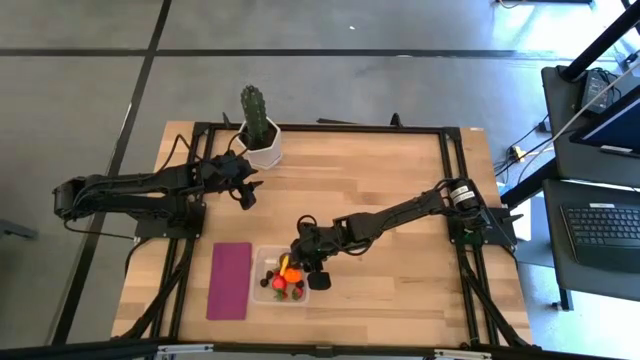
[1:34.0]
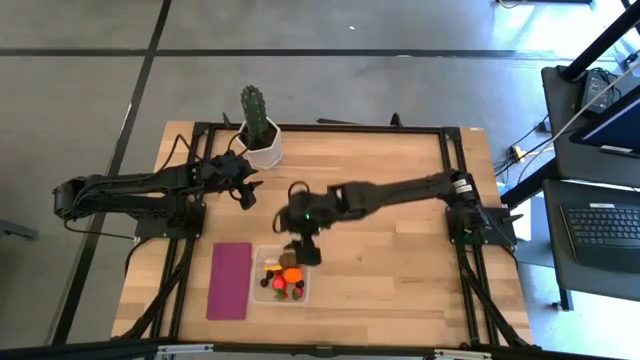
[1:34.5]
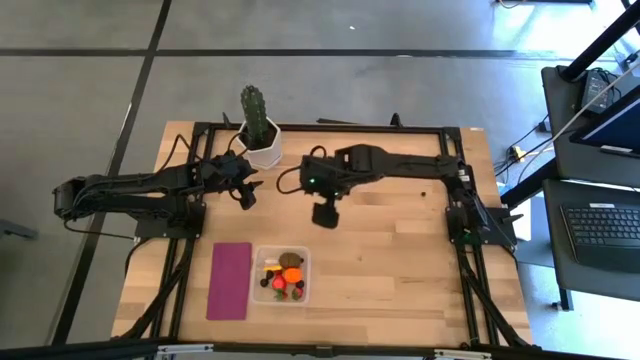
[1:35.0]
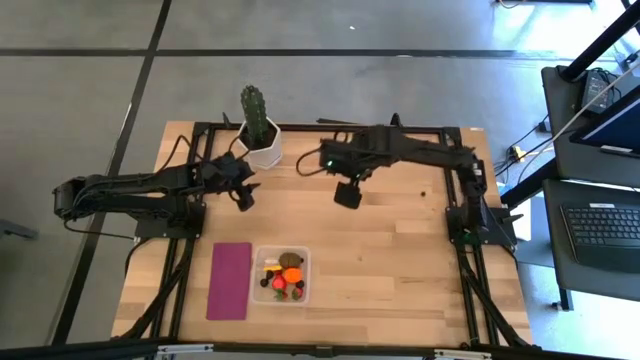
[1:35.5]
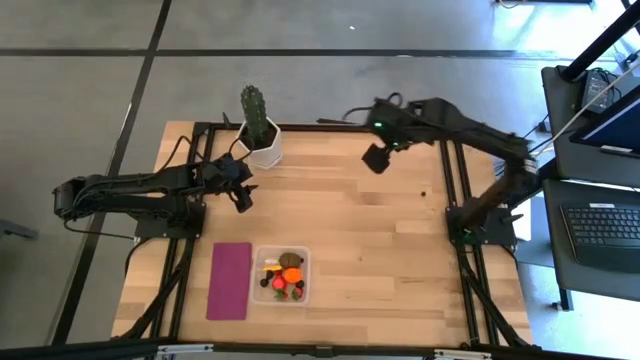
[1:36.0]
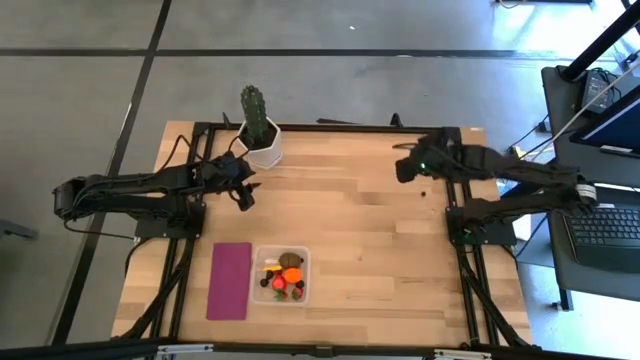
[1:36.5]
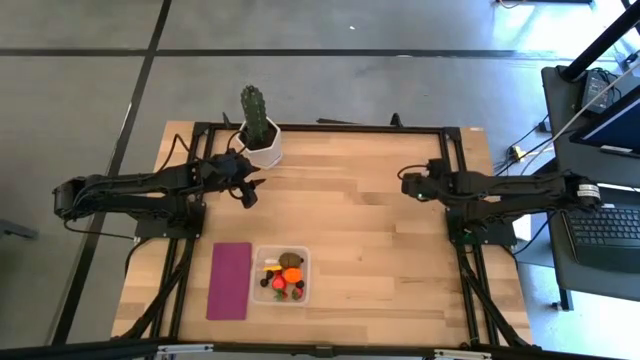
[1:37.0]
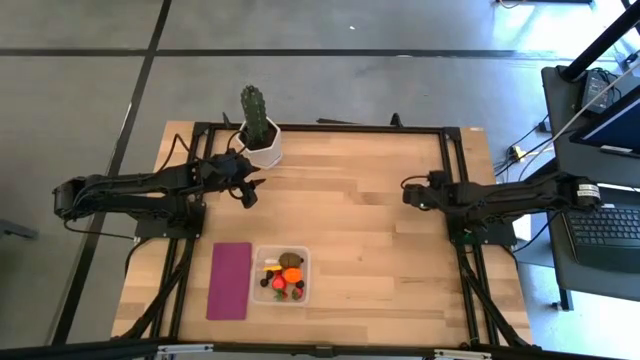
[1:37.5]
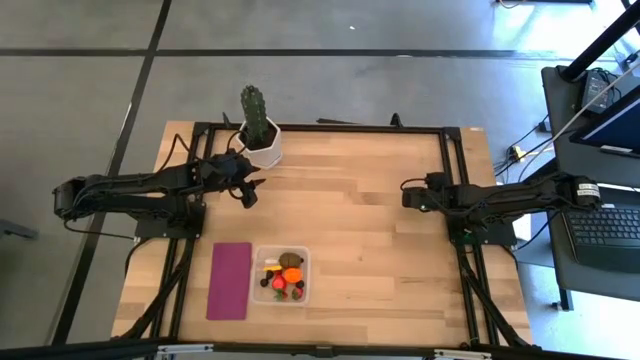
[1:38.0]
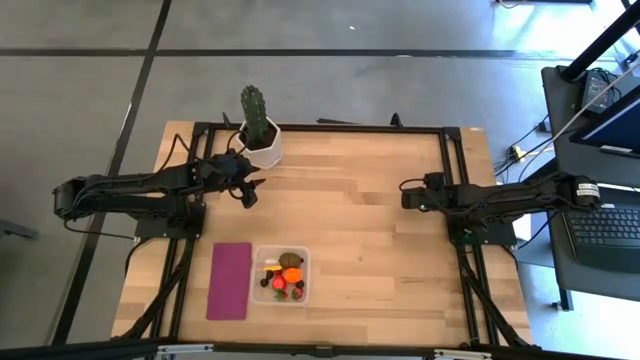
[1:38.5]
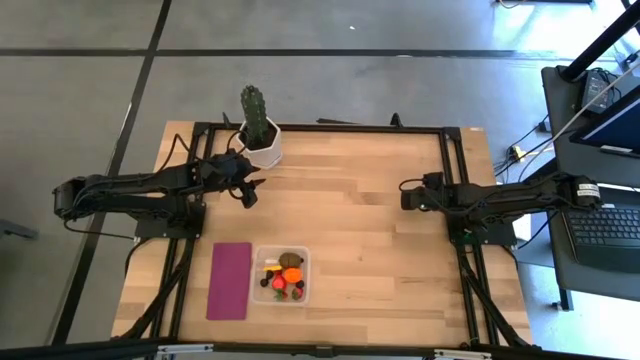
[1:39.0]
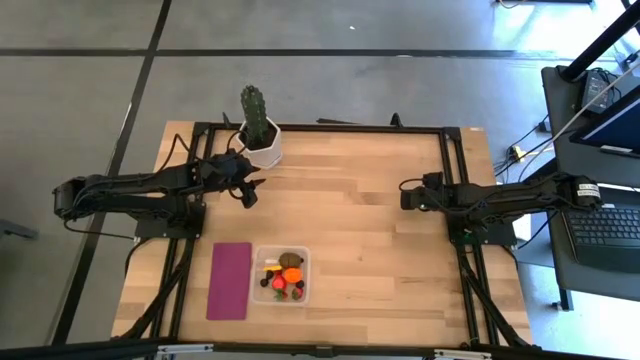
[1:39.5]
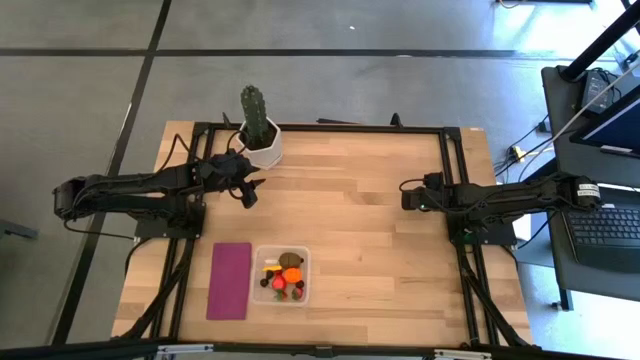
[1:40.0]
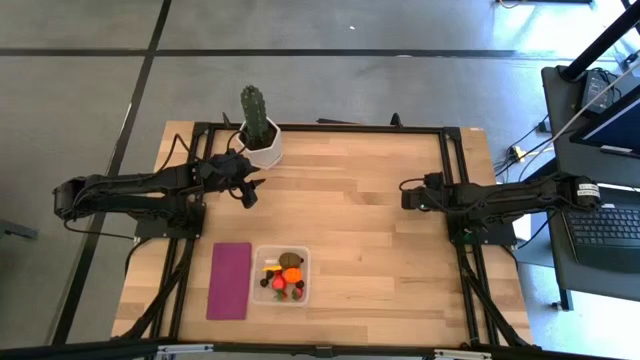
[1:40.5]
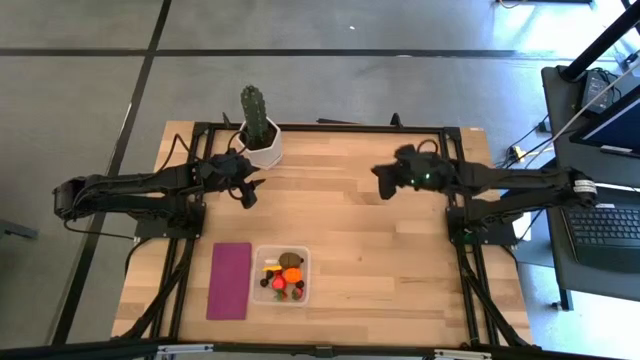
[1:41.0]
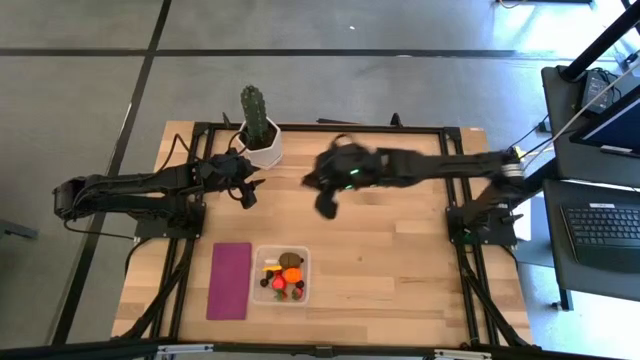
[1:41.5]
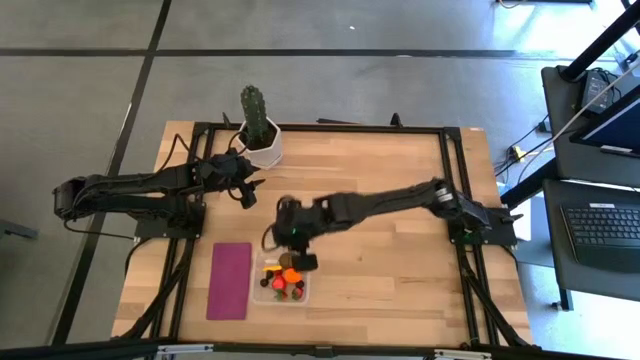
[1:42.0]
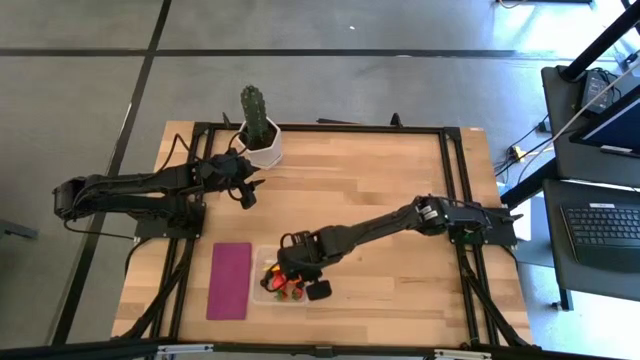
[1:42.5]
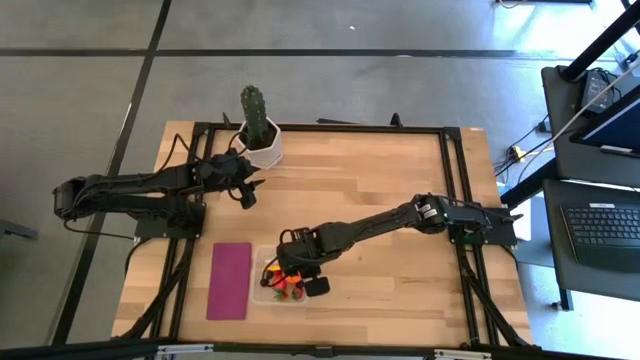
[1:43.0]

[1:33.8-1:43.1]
Task: Pick and placing Produce into tupperware
Put the blueberry into the transparent bin

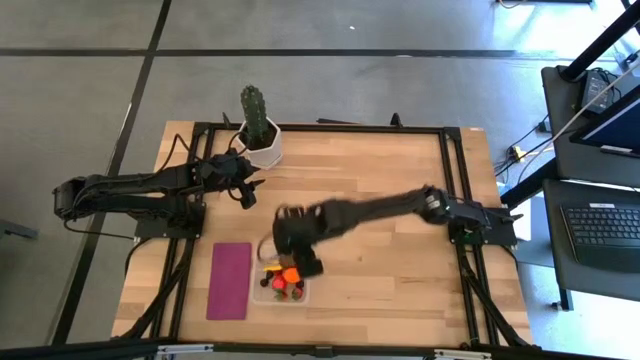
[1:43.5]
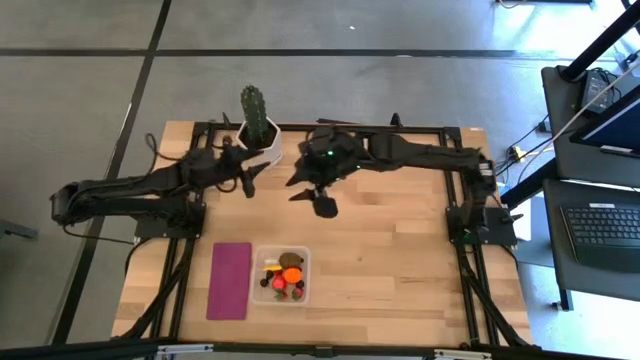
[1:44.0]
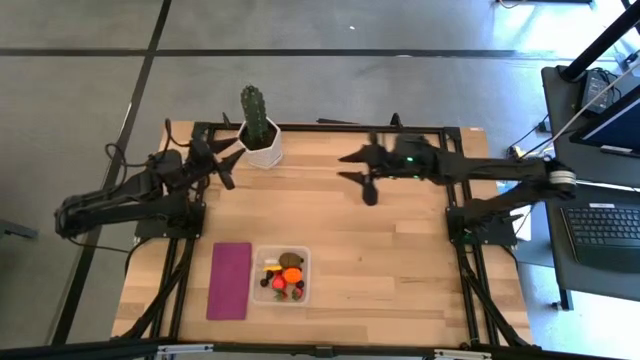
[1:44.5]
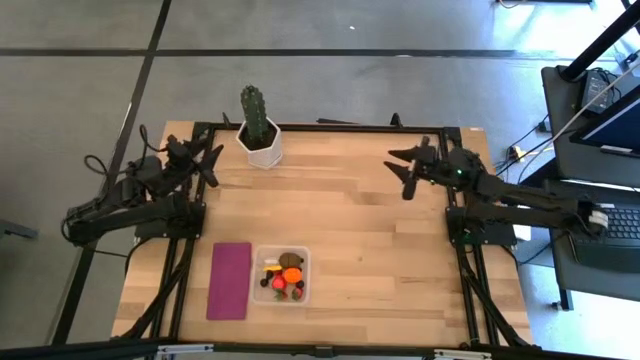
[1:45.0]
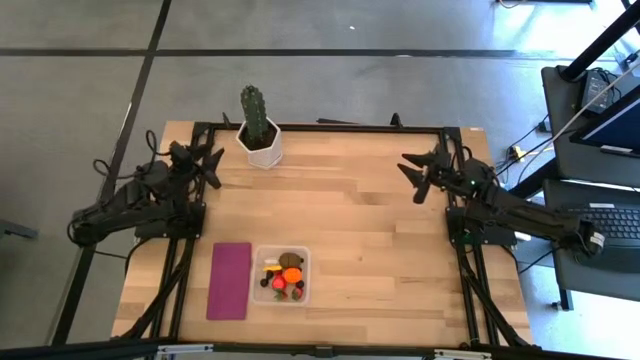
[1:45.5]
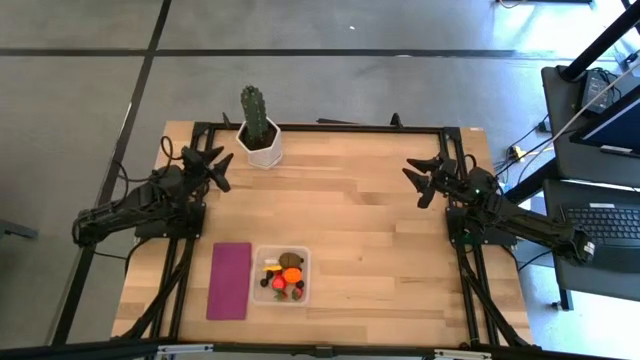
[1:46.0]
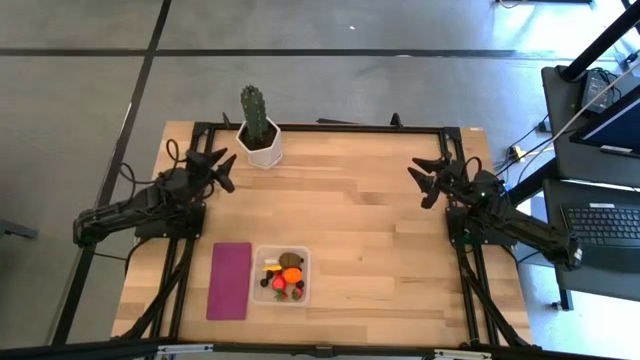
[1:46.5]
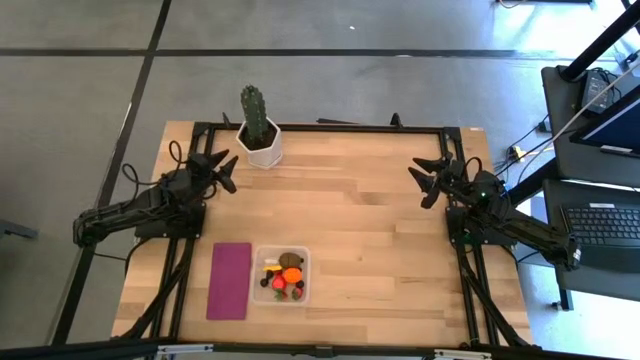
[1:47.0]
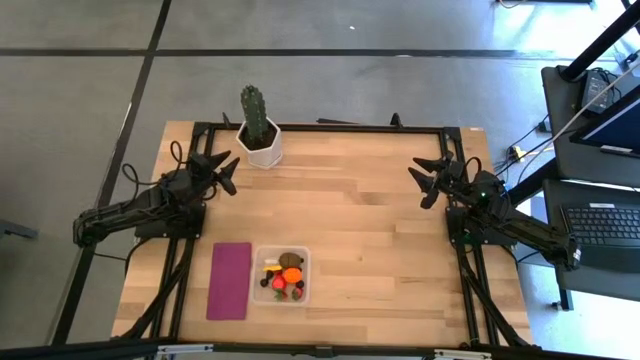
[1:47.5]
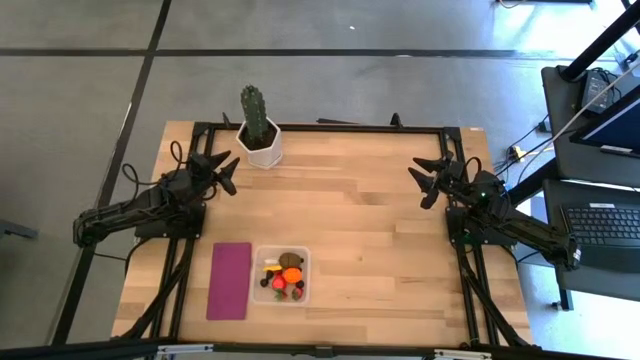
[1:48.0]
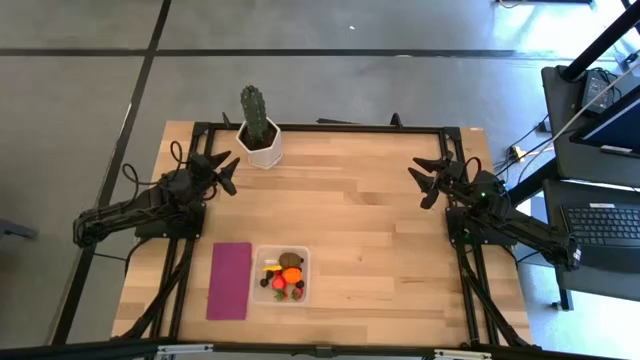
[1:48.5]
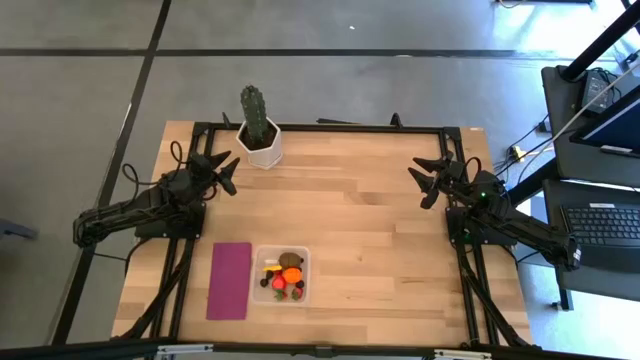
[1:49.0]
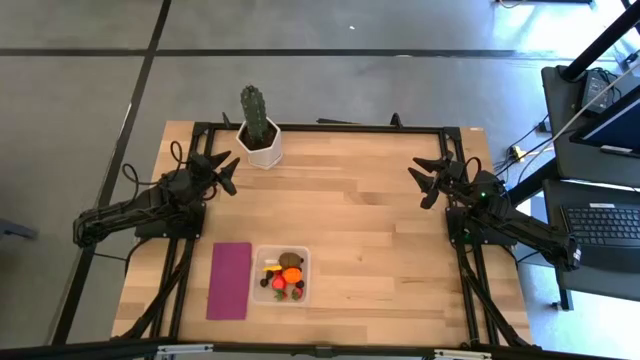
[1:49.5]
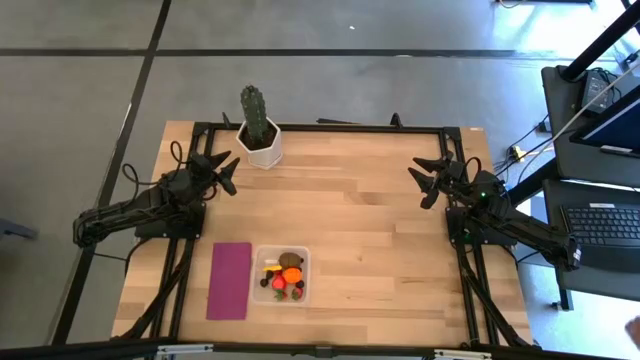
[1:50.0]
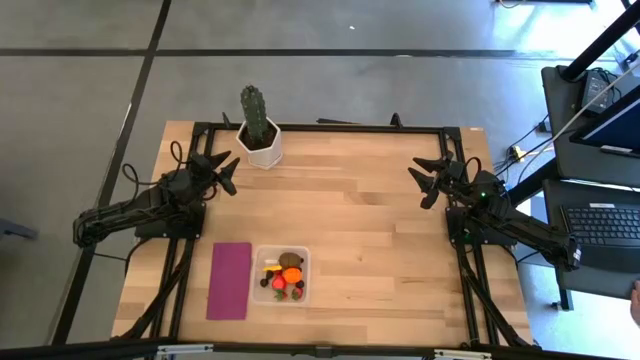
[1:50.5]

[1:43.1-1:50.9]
Return to Home Position

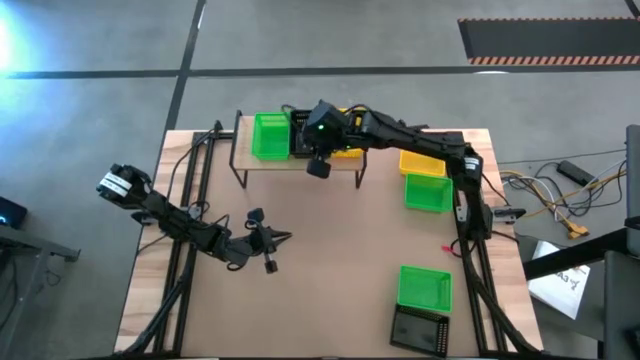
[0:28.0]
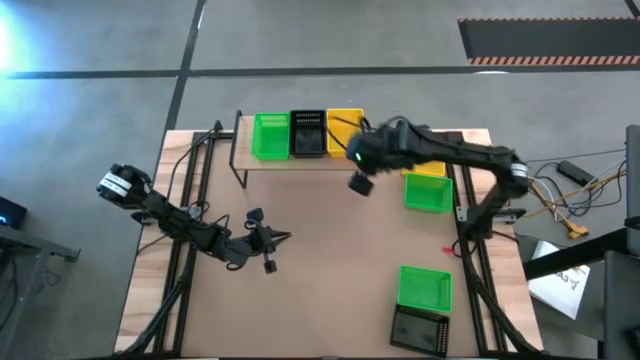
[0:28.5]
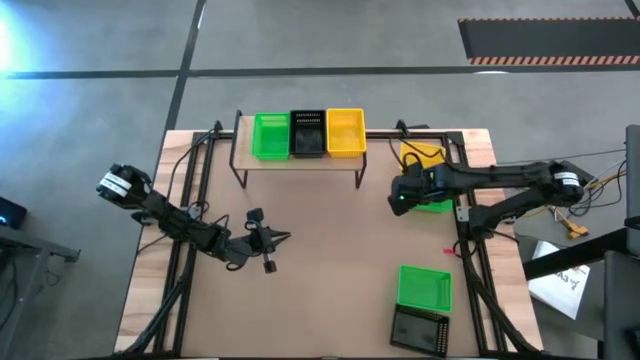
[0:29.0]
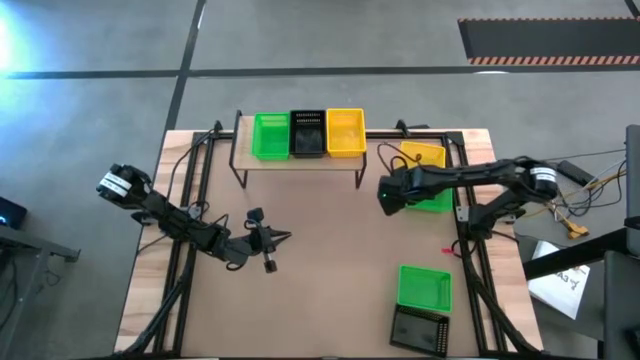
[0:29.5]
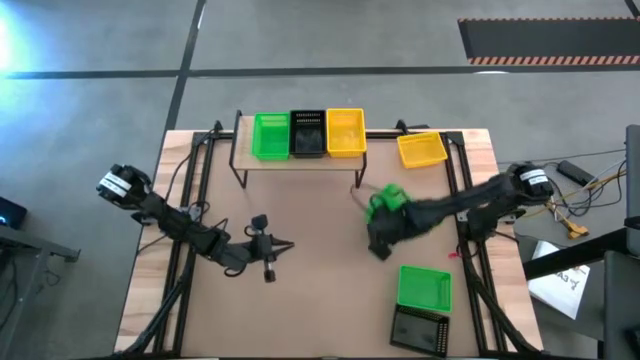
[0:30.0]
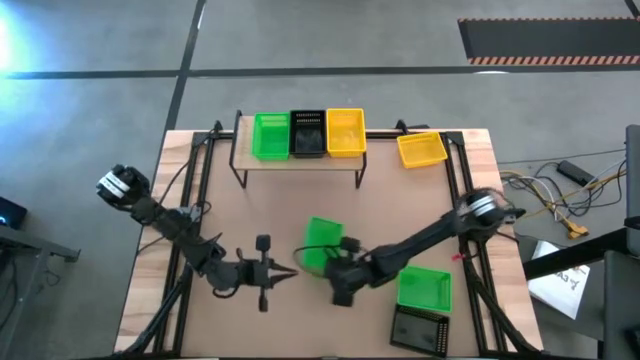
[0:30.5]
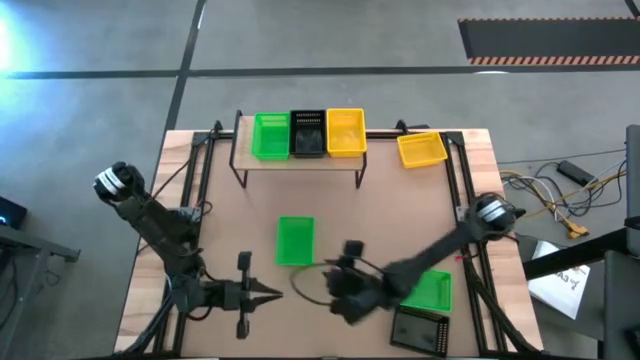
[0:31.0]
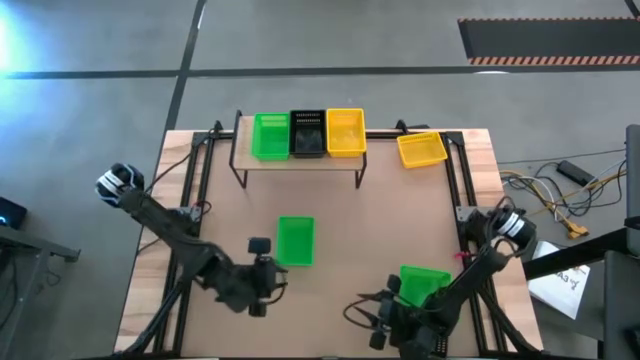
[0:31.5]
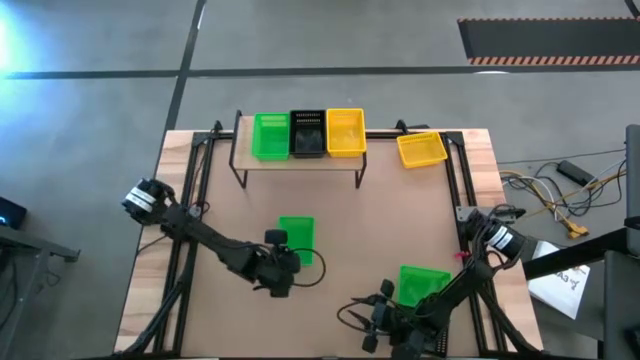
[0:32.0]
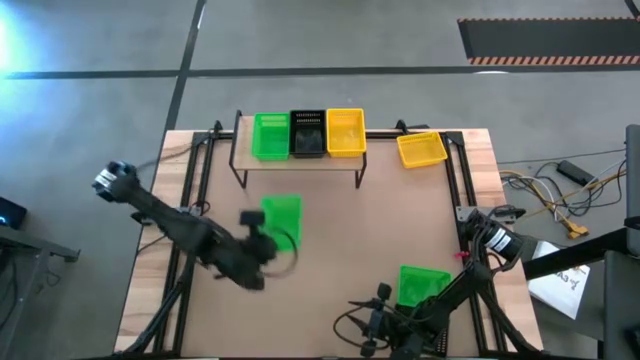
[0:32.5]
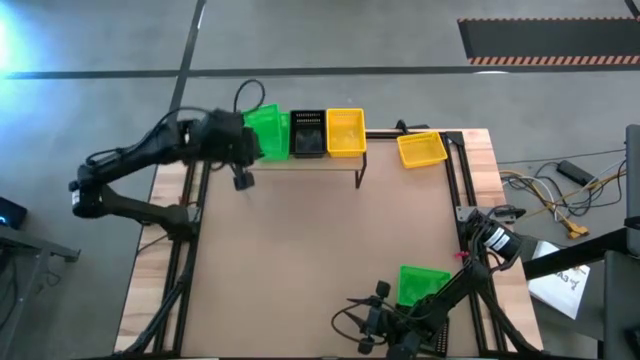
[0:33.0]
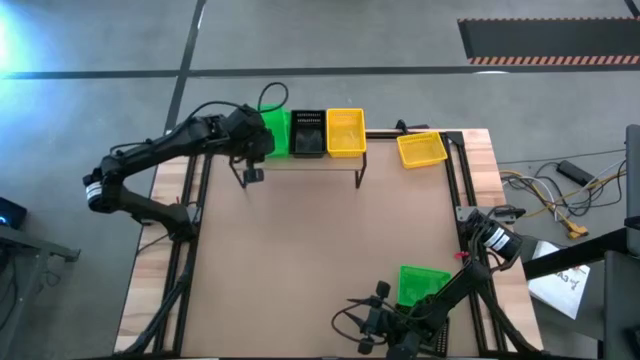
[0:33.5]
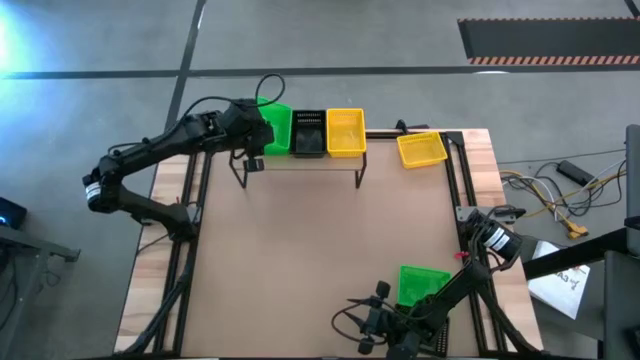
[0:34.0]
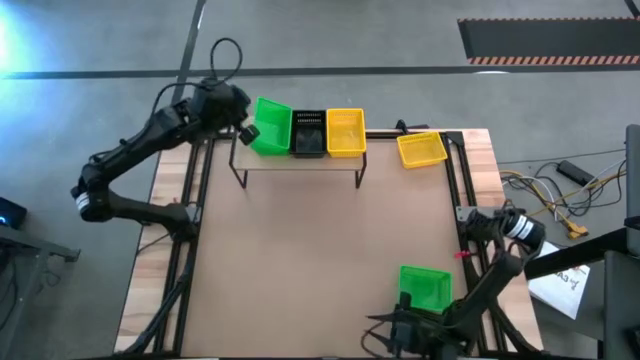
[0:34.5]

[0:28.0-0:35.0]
Task: Stack baskets on shelf by color
Stack the top green bin on the green bin on the shelf
